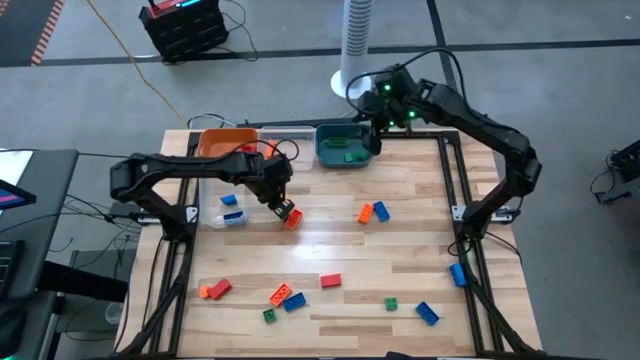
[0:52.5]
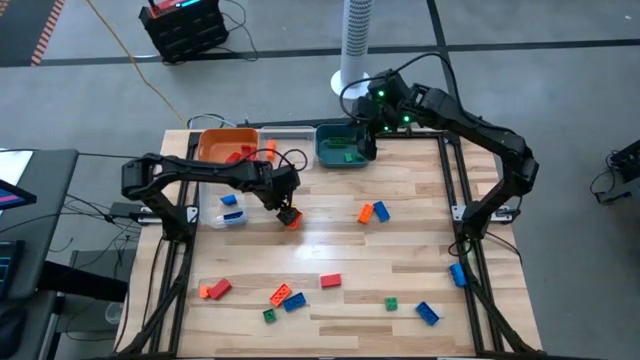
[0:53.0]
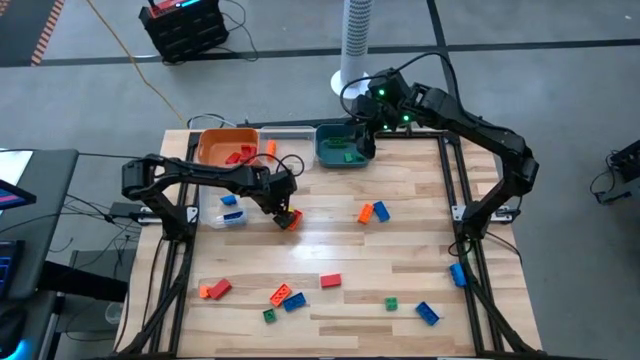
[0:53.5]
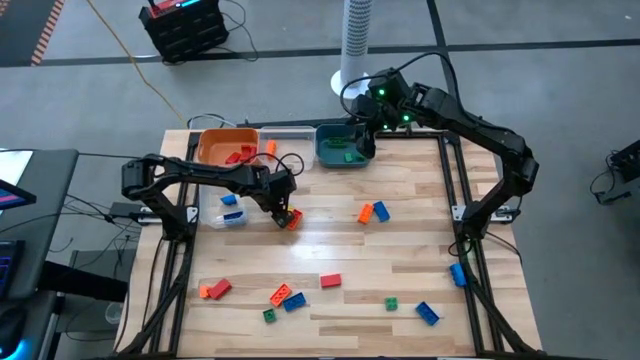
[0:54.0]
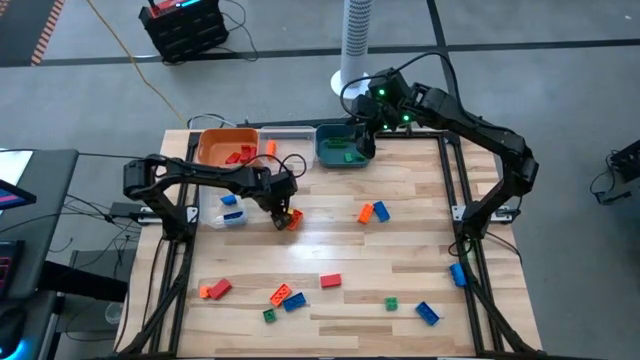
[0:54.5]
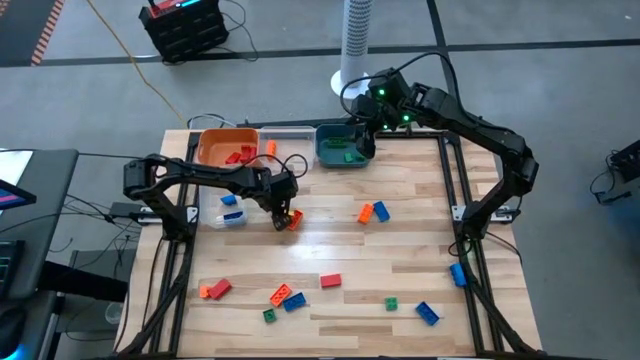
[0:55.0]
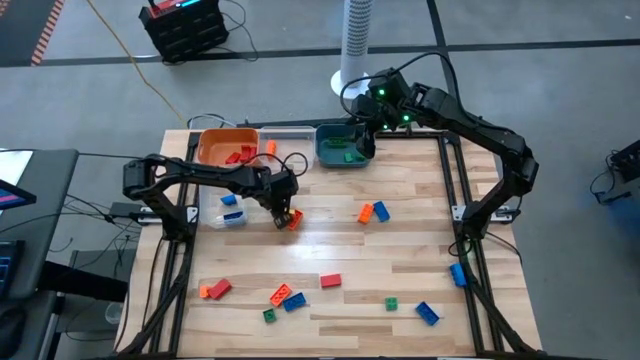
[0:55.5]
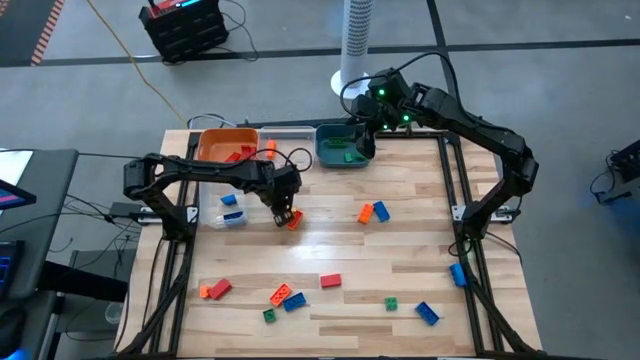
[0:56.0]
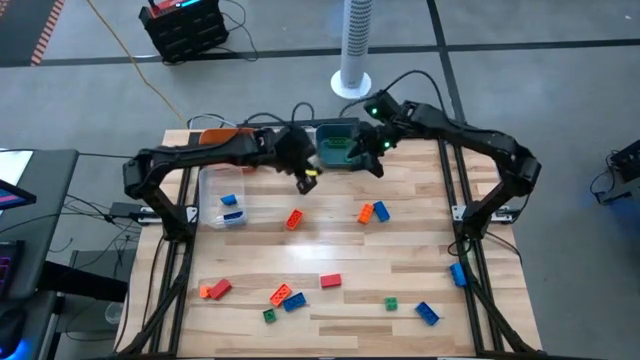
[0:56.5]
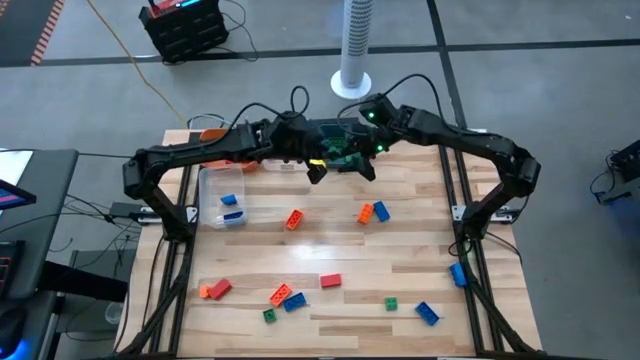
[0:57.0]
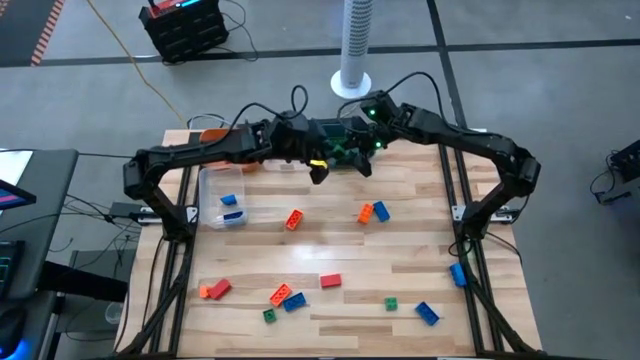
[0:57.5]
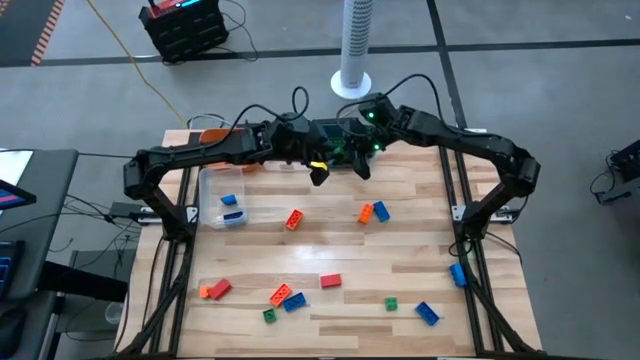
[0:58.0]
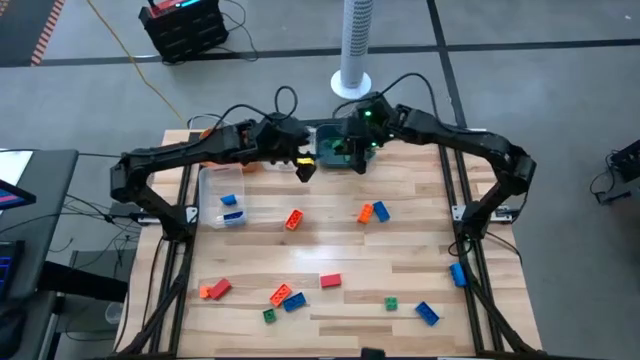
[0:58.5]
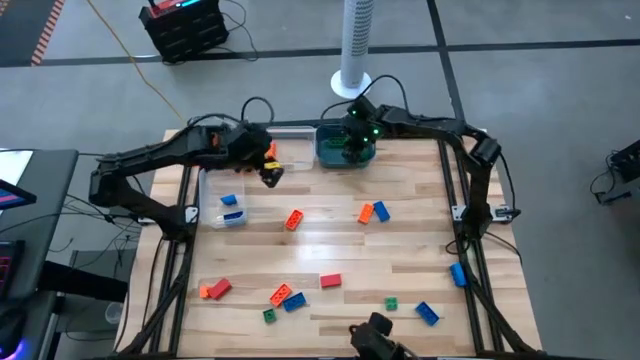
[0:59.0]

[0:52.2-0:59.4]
Task: Sort blocks
Put the green game piece into the blue bin

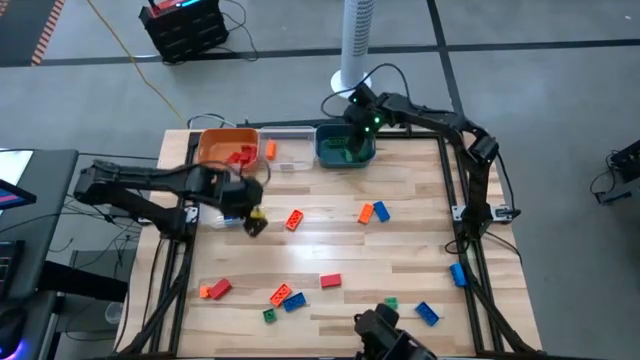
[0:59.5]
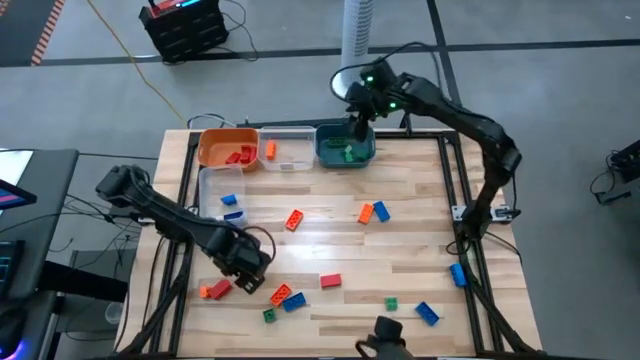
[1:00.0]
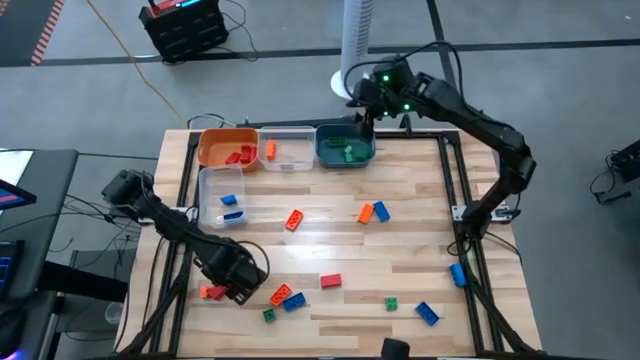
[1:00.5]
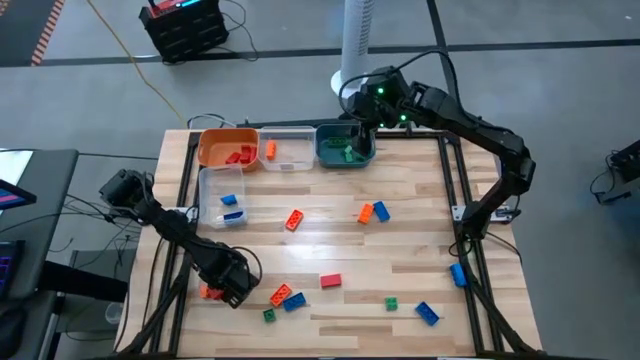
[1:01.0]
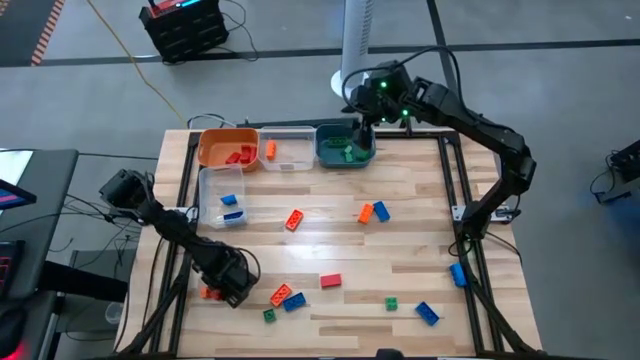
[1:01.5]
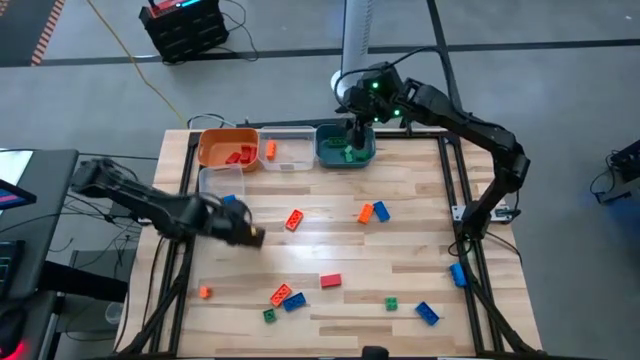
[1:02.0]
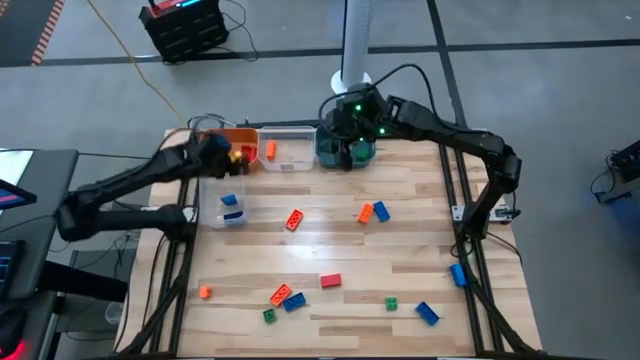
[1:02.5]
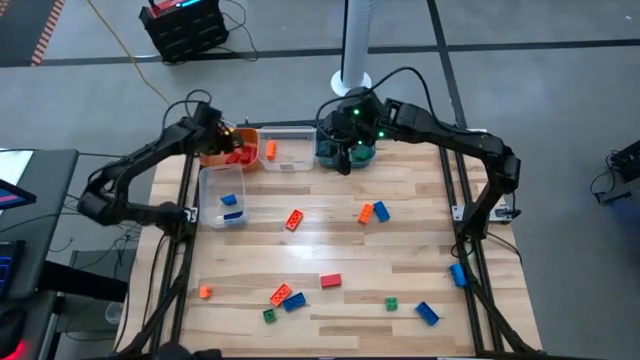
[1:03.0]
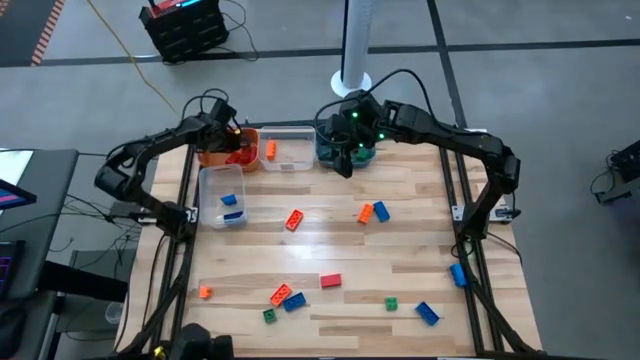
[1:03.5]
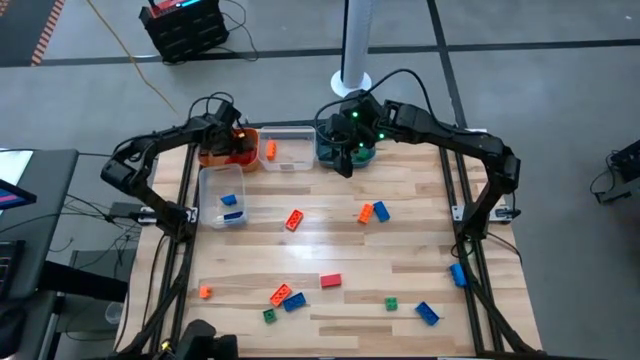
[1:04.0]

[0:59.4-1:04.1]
Put the red block into the orange bin

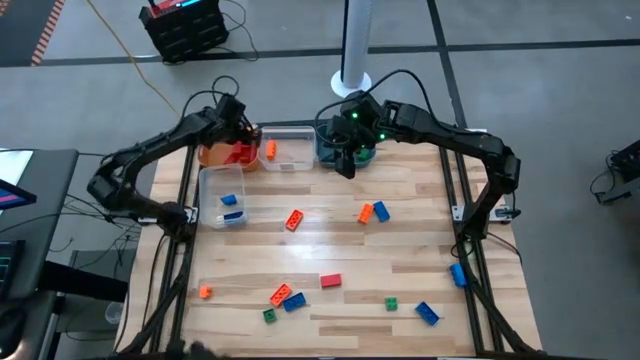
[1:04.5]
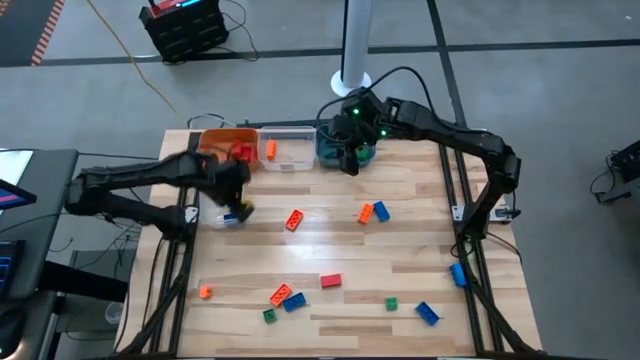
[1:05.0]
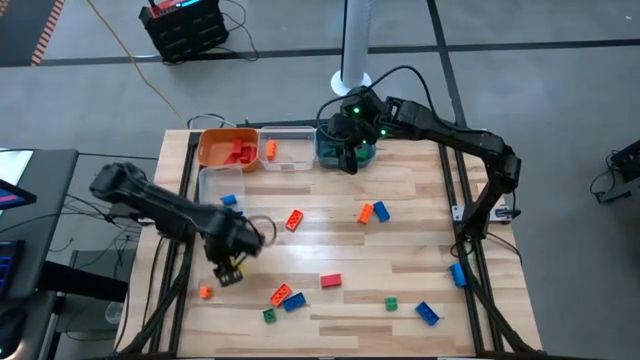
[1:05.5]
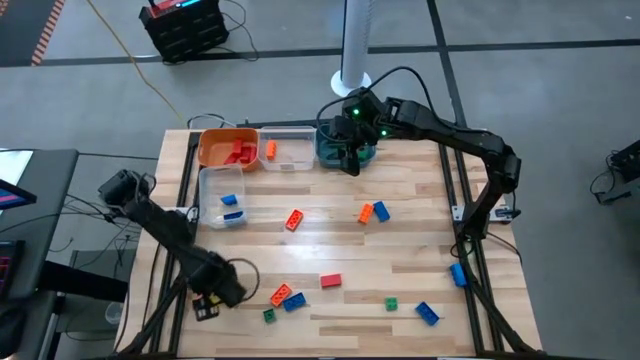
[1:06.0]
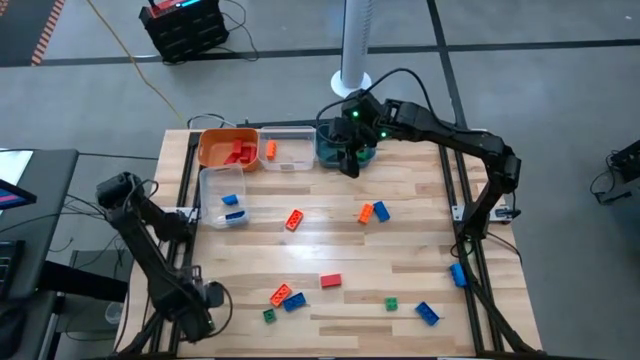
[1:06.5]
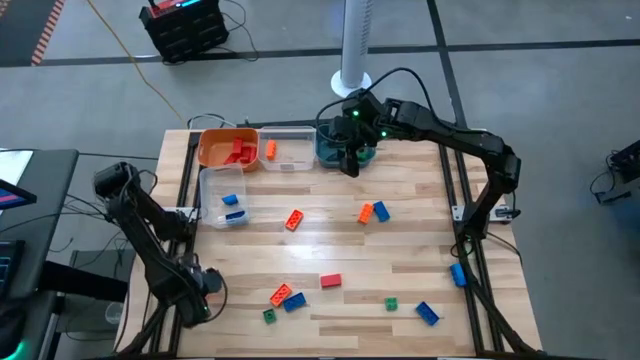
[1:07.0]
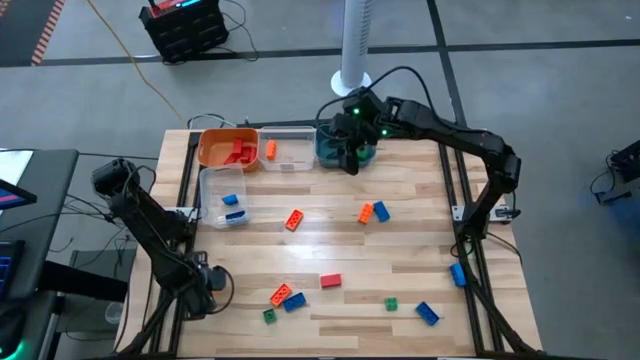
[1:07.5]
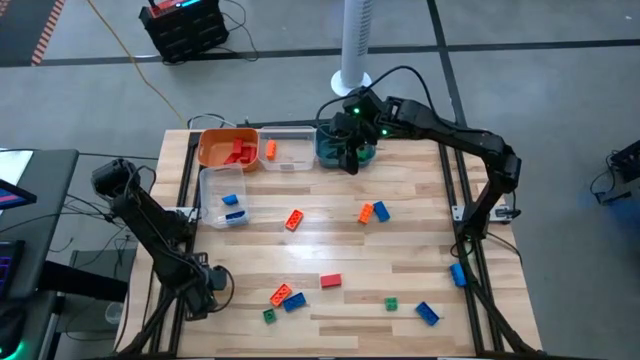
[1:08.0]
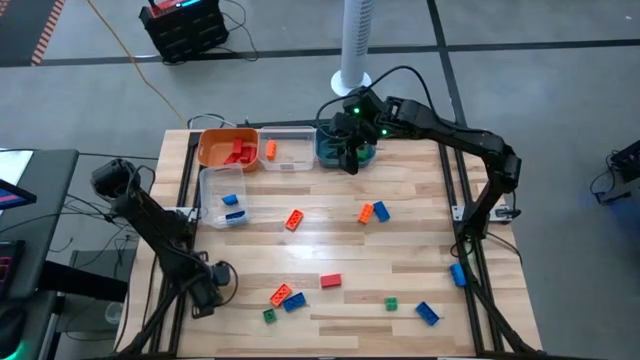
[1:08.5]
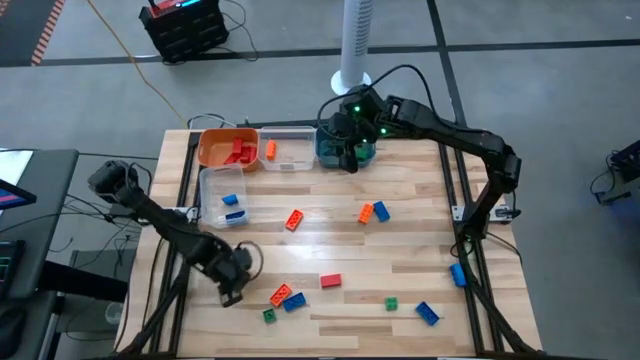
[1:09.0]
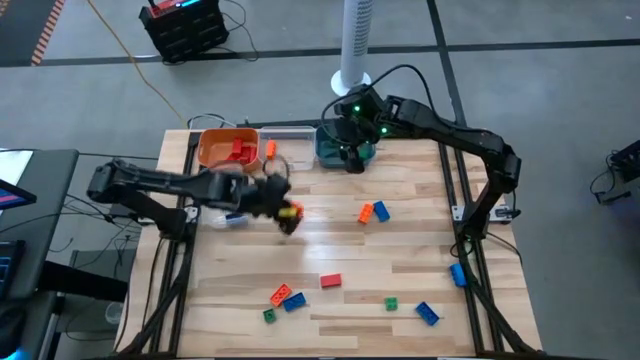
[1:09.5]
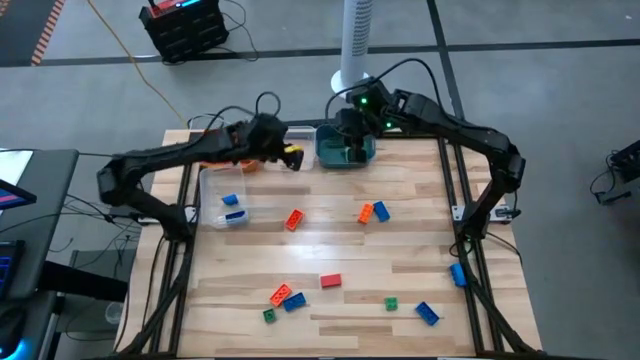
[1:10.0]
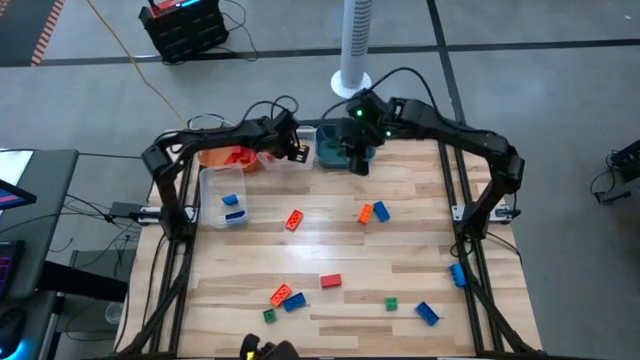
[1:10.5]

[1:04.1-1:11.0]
Put the orange game piece into the top transparent bin

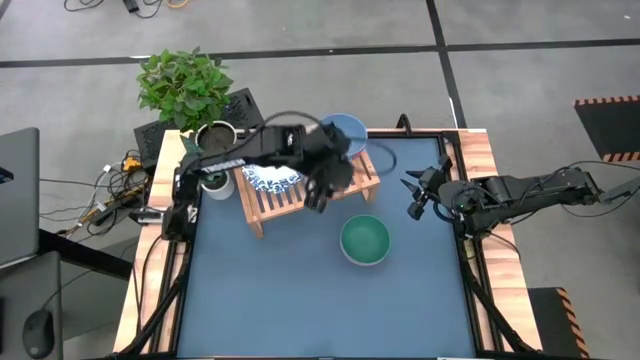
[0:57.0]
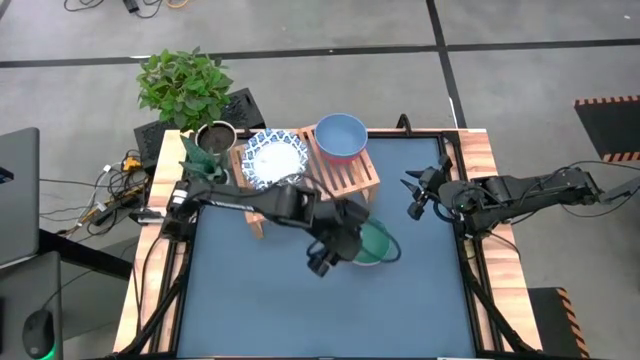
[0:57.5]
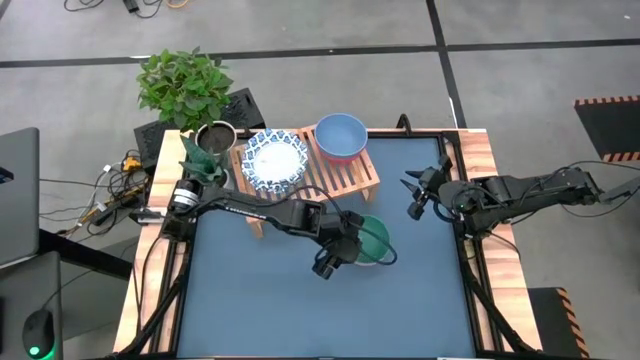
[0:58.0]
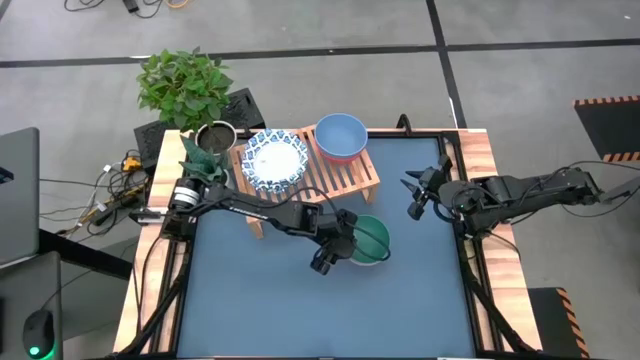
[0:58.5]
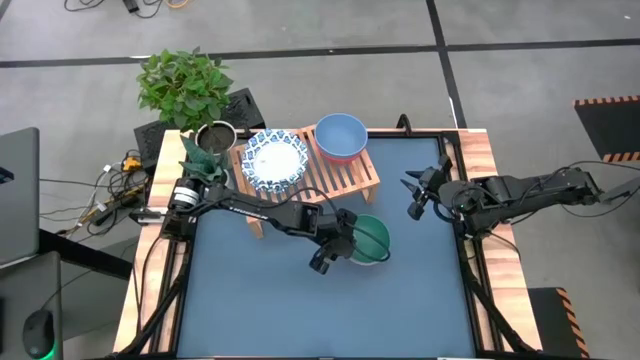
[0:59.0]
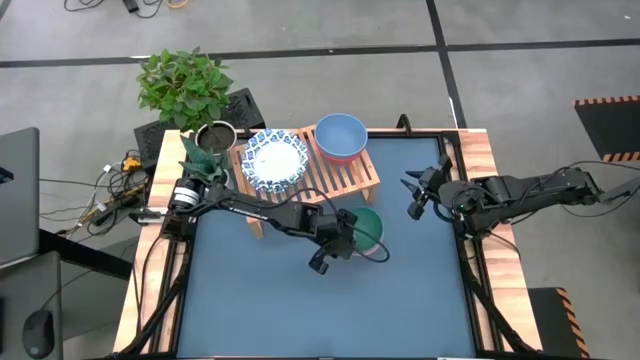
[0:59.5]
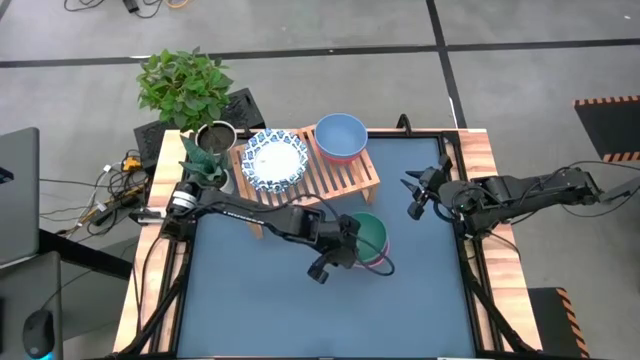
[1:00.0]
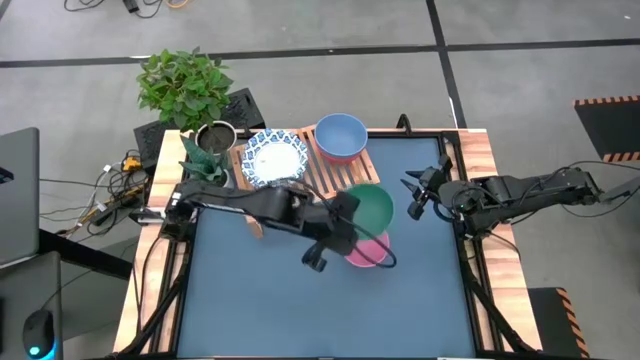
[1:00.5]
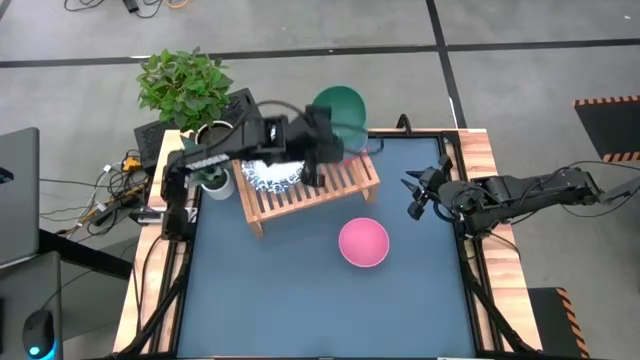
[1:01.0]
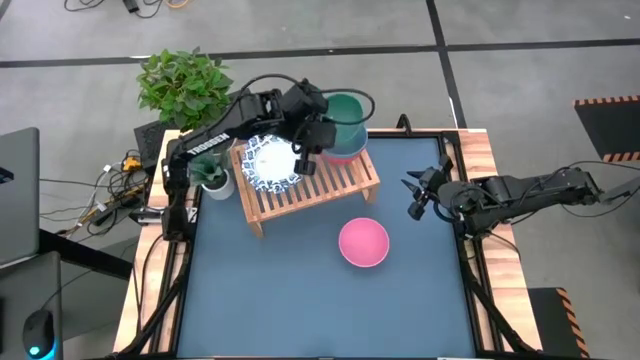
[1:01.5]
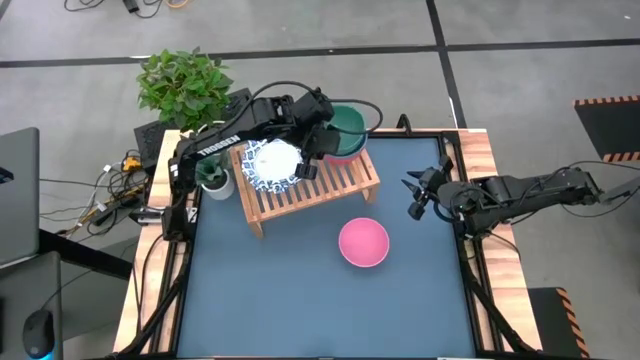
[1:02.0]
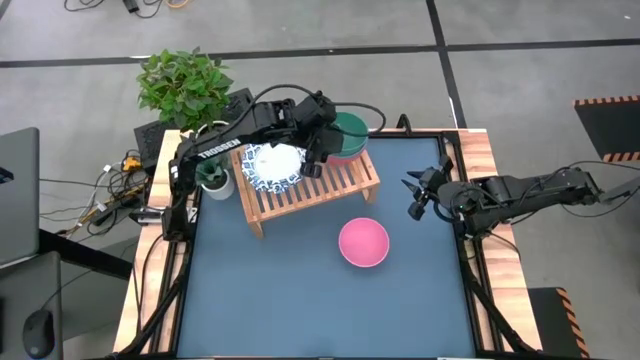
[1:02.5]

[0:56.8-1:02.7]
Task: Place and stack bowls onto a shelf
Stack the green bowl on top of the blue bowl
